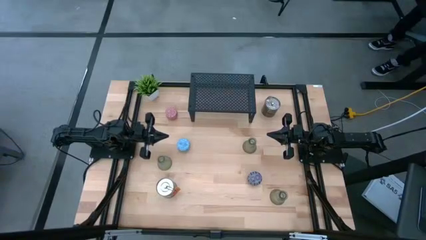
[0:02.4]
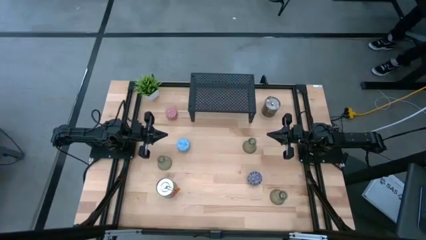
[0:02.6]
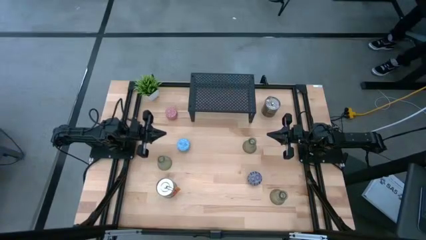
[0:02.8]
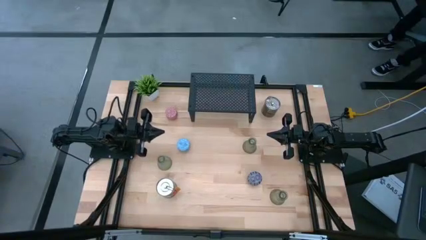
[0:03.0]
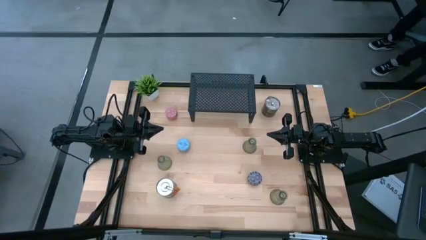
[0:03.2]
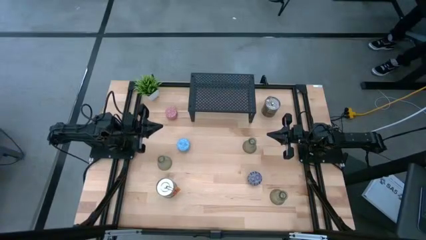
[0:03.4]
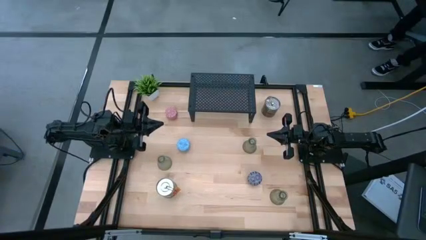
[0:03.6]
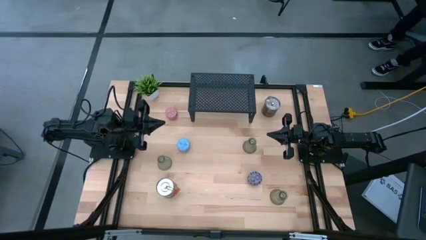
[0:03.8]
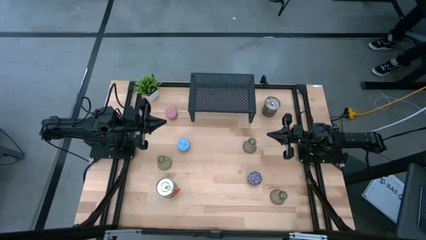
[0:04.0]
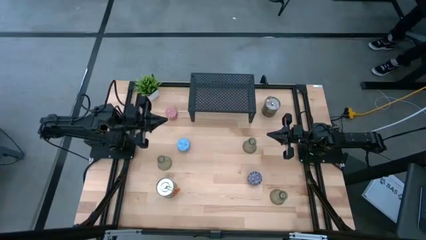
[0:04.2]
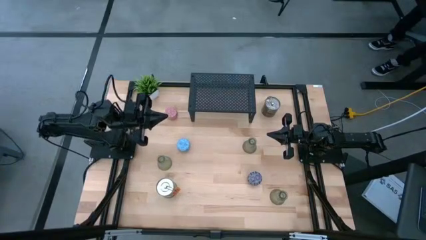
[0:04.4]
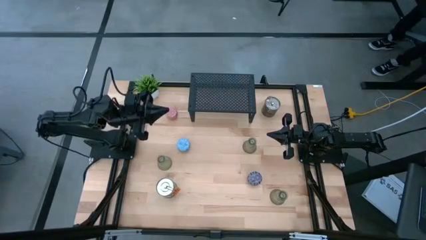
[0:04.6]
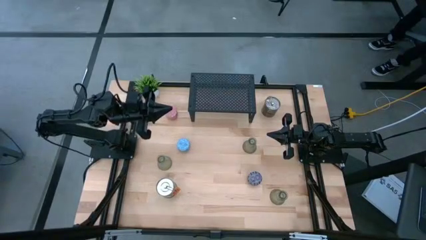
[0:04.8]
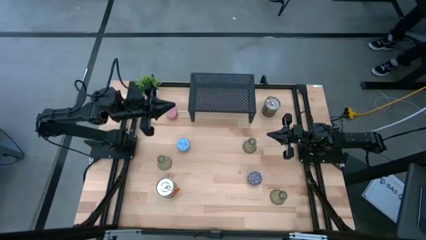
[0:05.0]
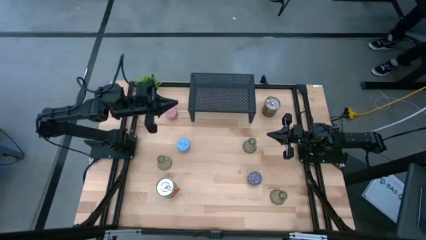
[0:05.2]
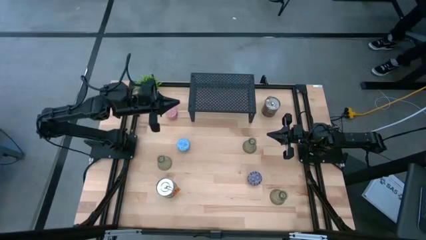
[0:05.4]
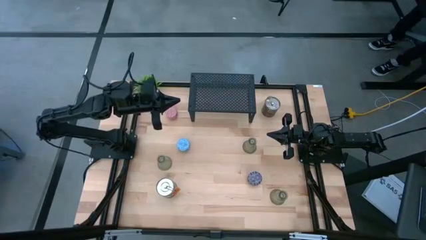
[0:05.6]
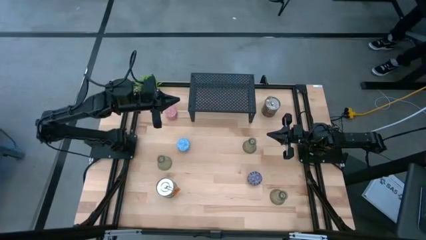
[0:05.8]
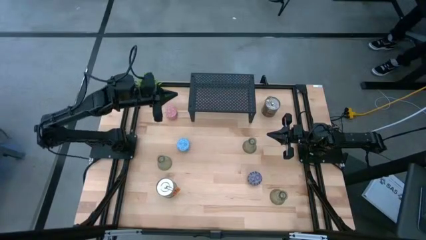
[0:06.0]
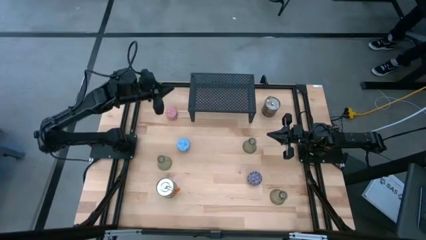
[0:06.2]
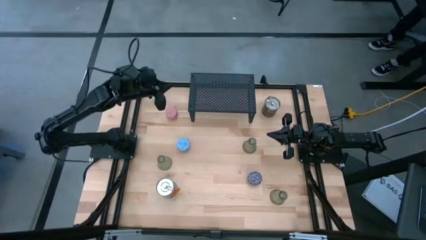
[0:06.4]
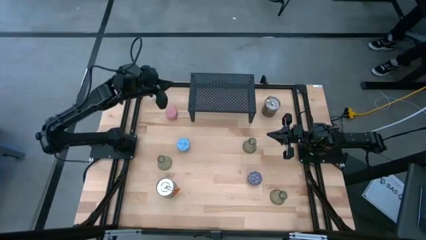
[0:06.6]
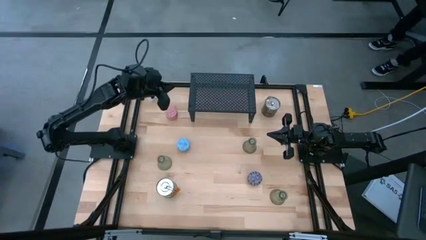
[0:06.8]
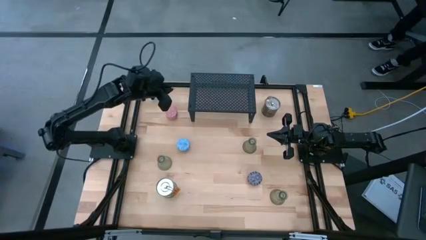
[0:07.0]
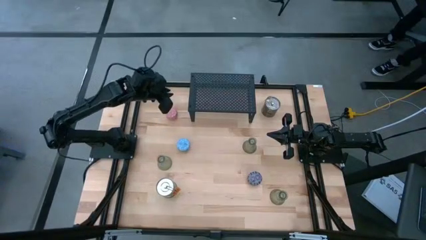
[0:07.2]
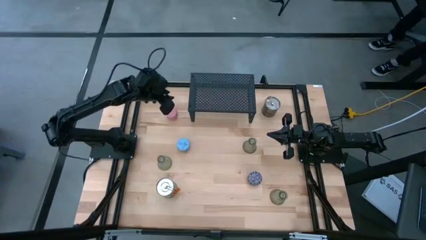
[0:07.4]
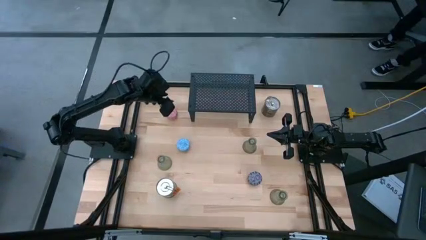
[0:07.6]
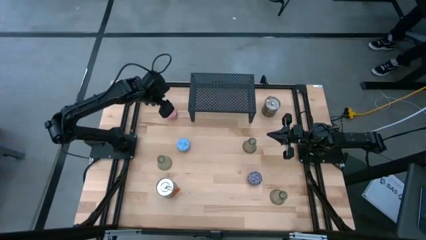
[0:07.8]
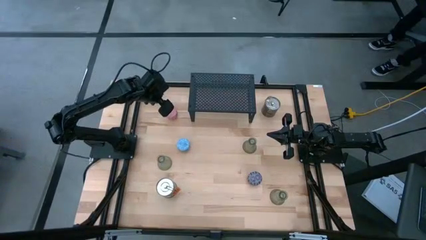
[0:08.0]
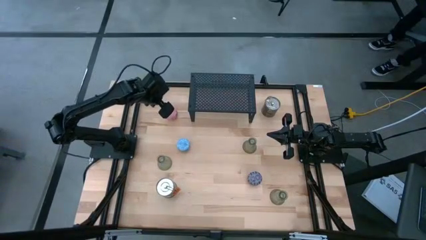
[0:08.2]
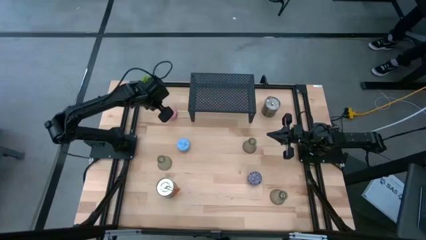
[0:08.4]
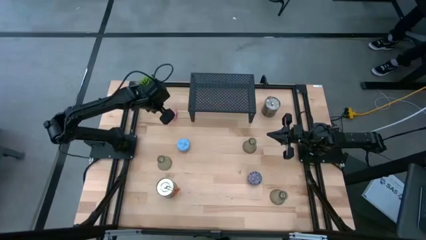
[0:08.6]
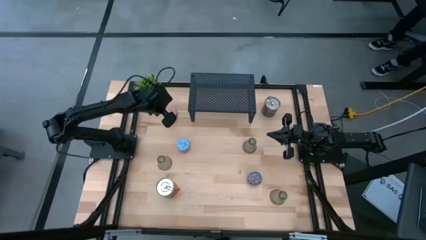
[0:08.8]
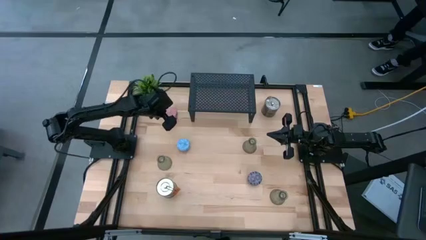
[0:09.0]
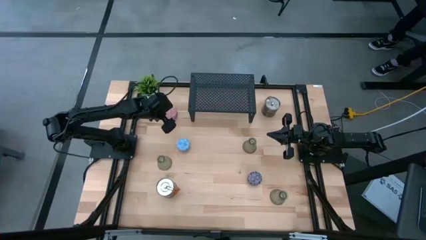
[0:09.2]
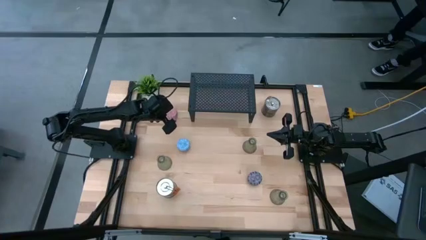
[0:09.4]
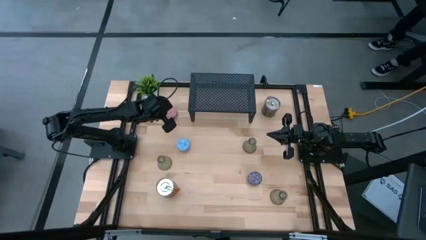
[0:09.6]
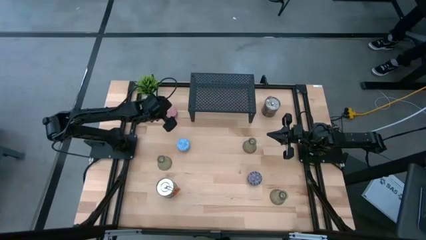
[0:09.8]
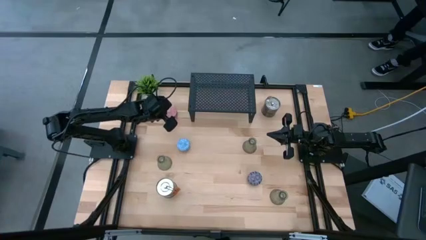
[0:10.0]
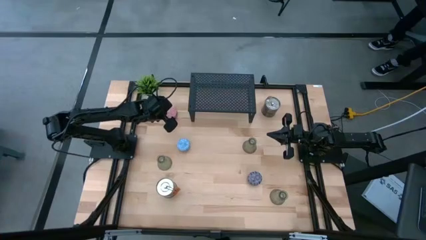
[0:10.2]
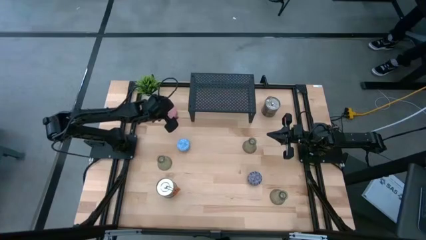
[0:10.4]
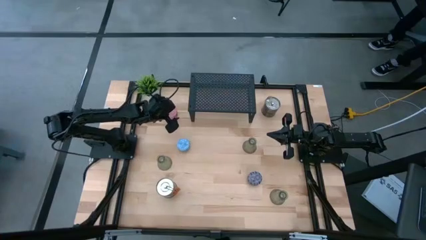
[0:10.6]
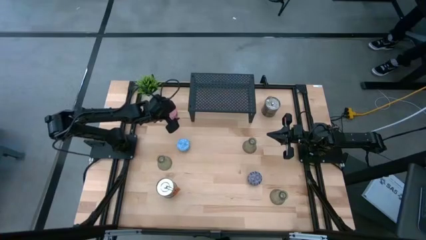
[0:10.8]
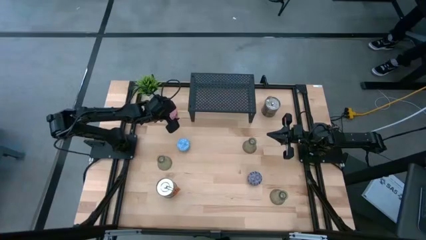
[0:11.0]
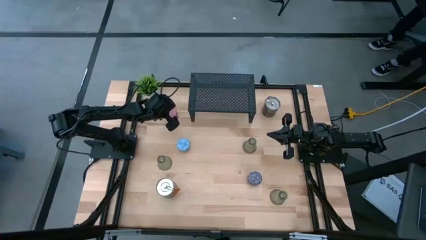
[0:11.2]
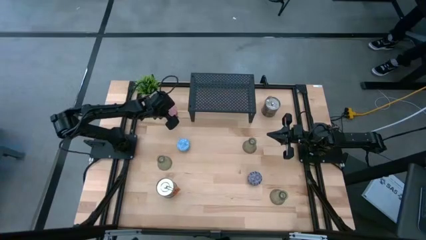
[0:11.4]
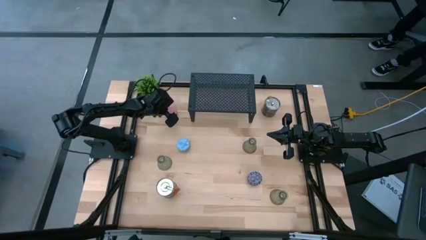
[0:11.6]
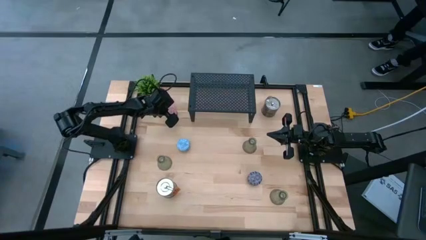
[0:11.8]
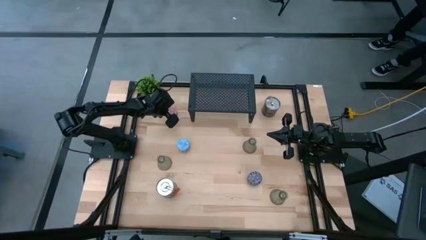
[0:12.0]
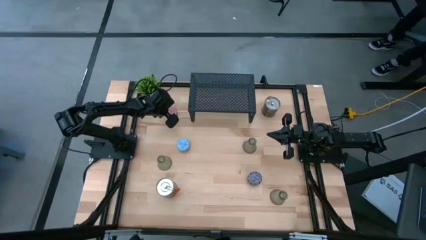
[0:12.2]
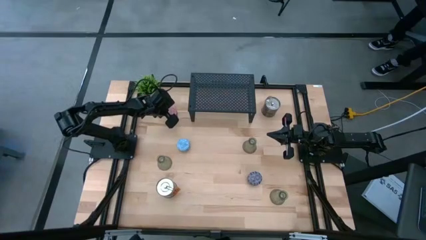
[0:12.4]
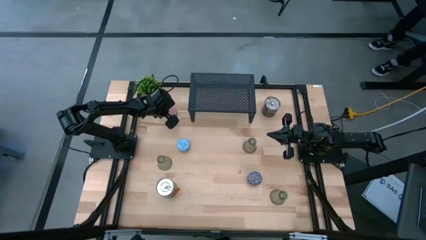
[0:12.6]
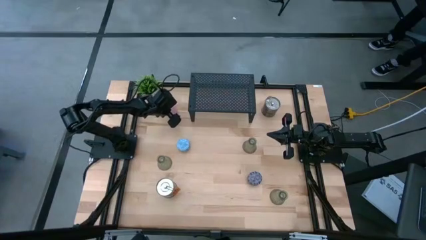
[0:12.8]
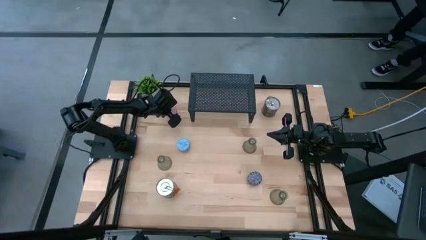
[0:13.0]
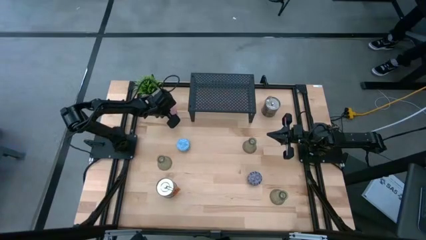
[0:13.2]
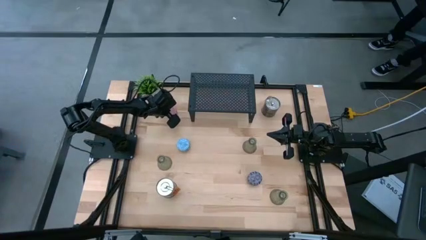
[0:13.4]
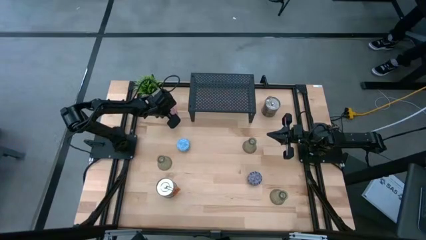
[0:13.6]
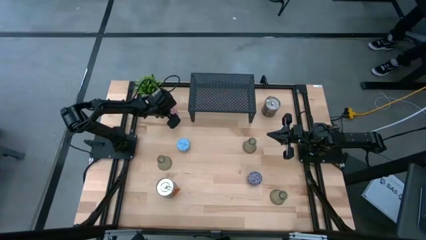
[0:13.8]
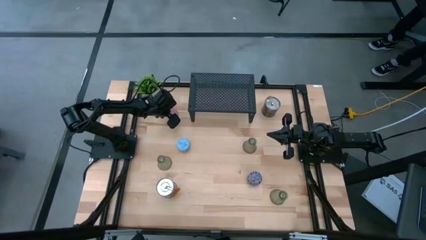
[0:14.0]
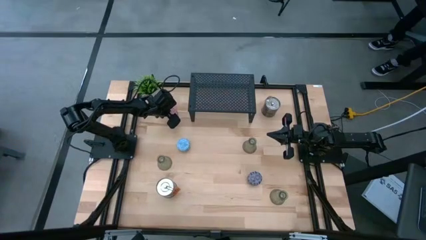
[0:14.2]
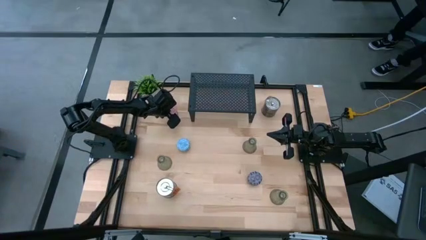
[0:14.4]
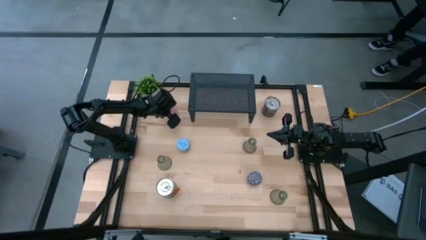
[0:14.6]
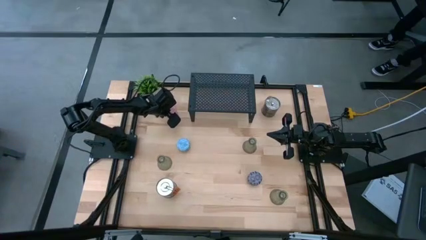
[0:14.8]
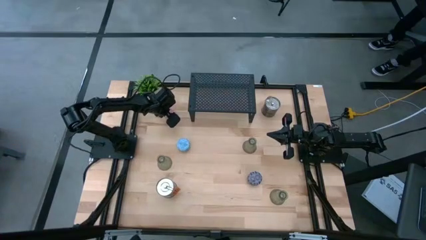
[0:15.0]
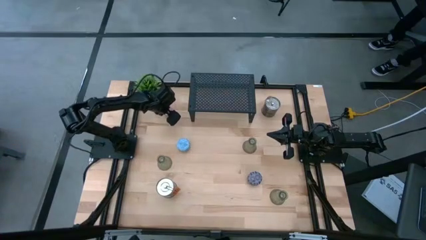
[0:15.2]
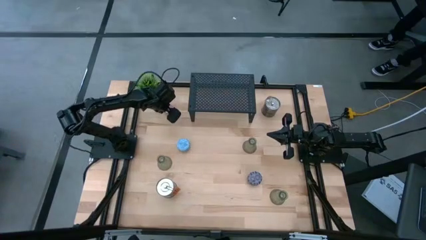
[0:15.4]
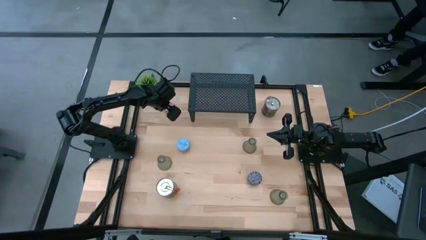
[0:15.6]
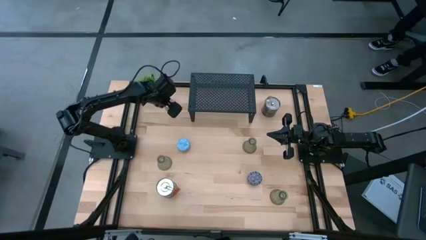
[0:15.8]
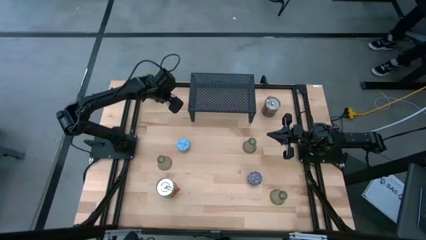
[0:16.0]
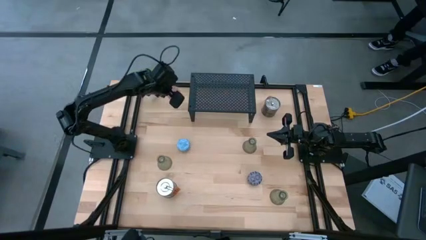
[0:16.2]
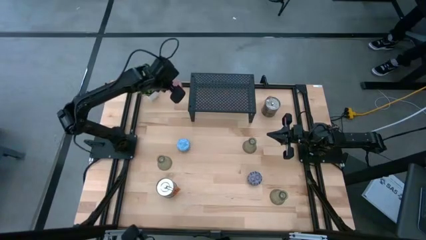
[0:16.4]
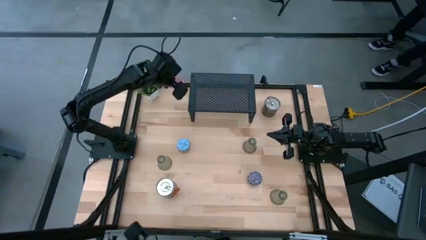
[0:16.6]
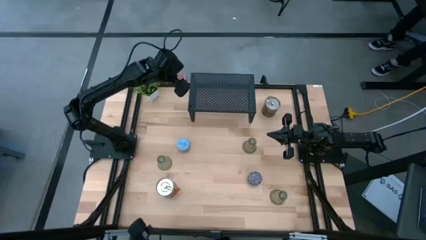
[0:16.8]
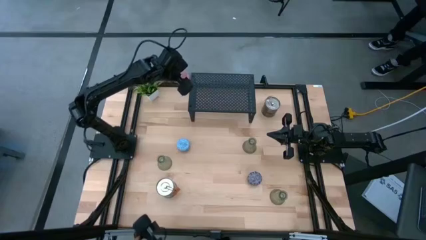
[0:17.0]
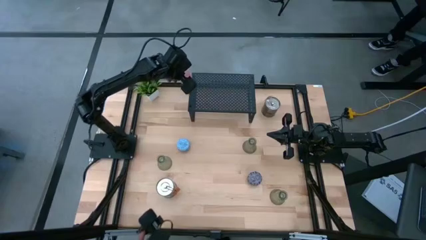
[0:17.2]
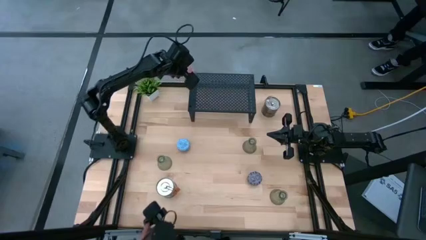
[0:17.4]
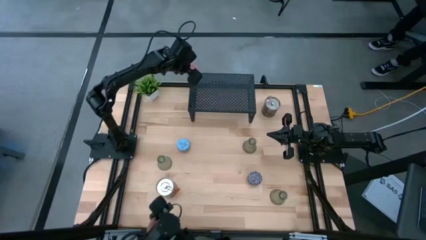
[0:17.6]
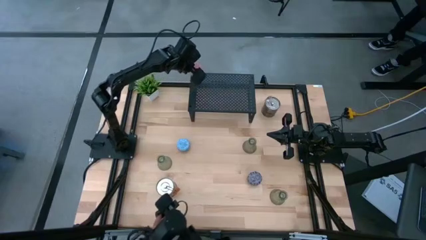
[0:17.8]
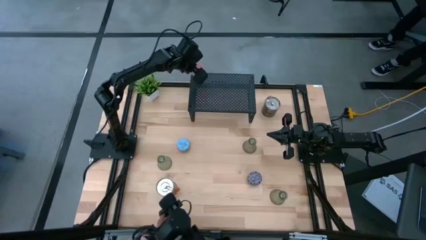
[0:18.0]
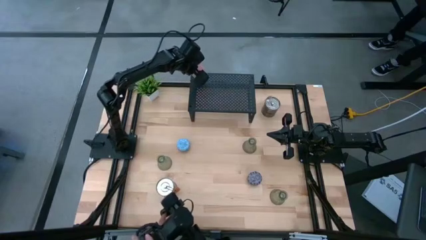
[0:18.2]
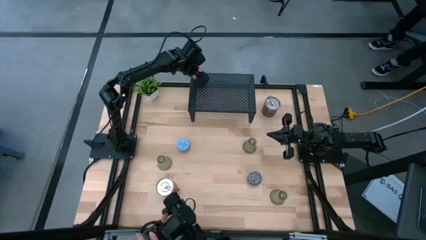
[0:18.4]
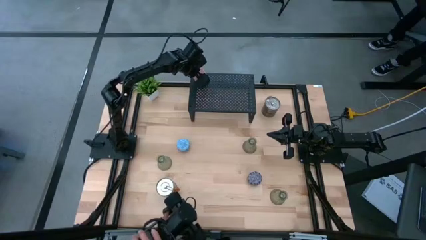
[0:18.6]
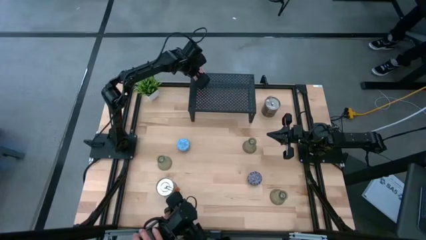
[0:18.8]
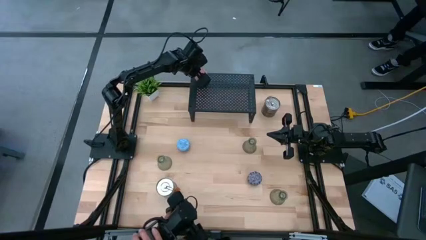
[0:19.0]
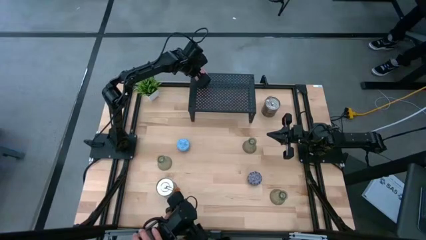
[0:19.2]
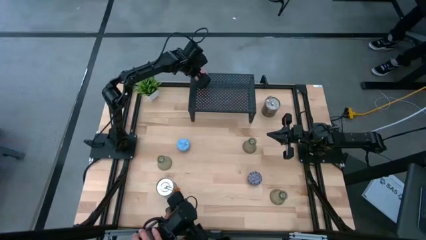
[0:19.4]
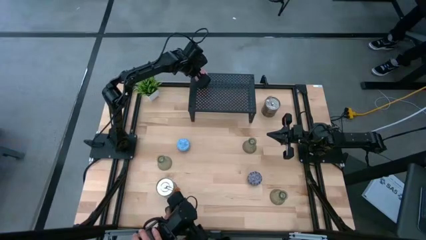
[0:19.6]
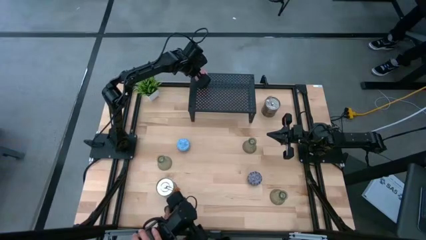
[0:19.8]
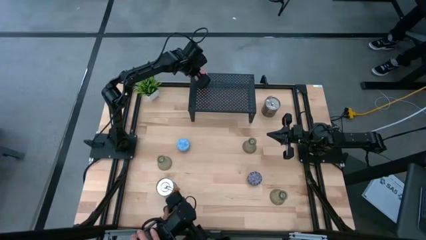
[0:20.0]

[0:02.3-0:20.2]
Task: Pick & Place candle stick holders
Put the pink patterned scented candle on the shelf
